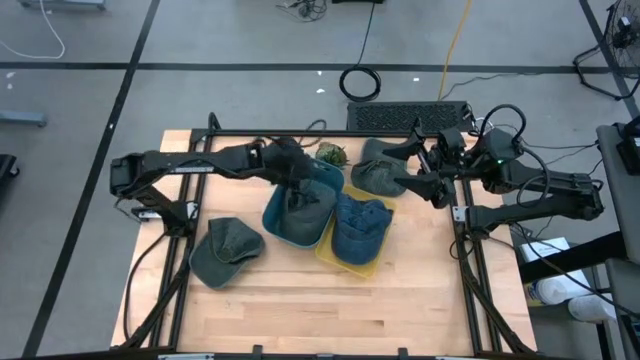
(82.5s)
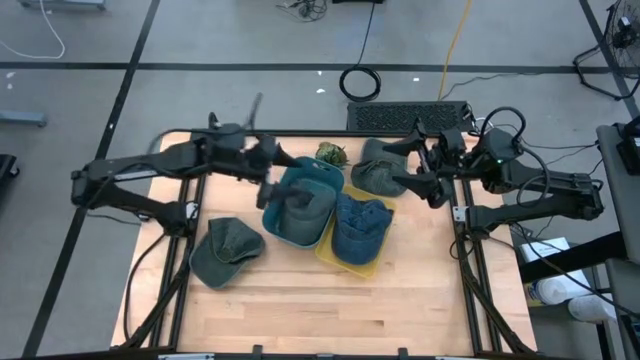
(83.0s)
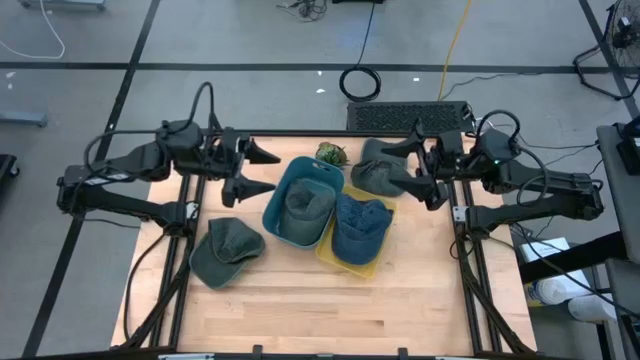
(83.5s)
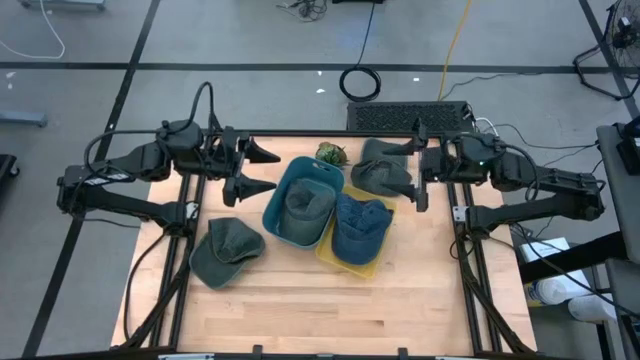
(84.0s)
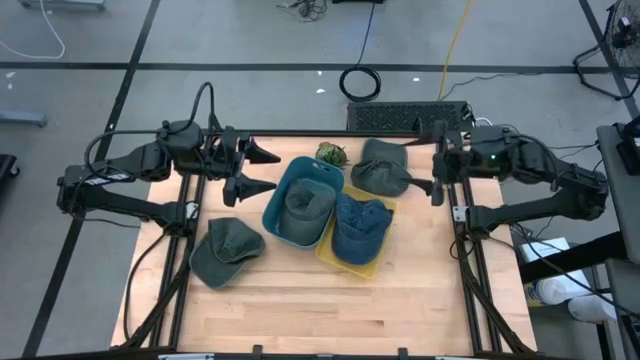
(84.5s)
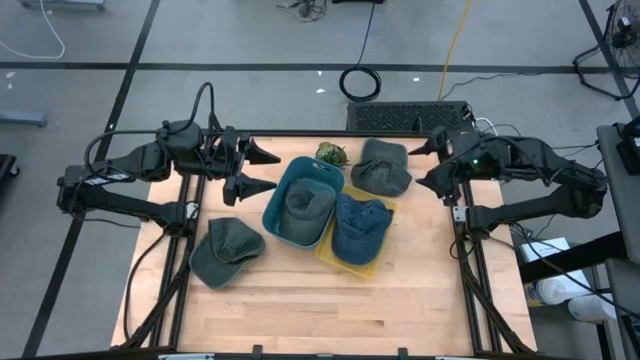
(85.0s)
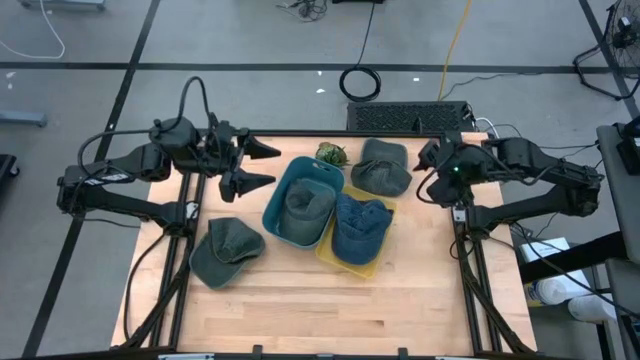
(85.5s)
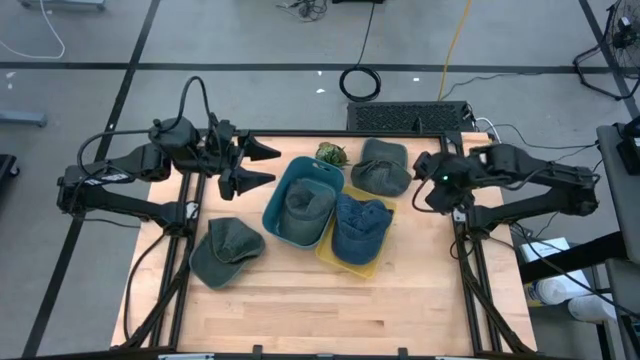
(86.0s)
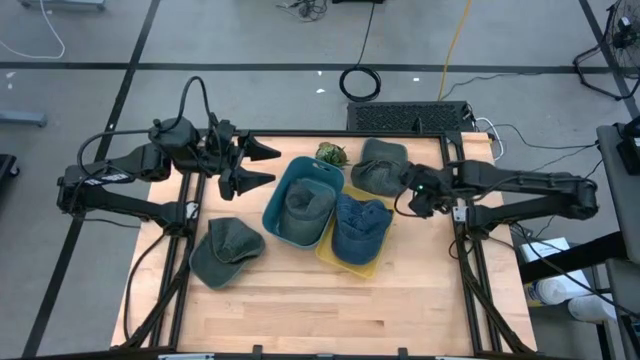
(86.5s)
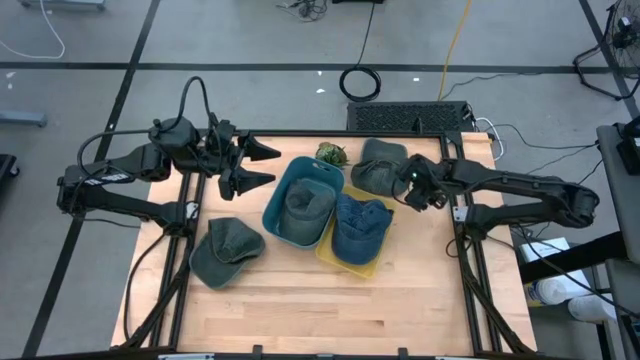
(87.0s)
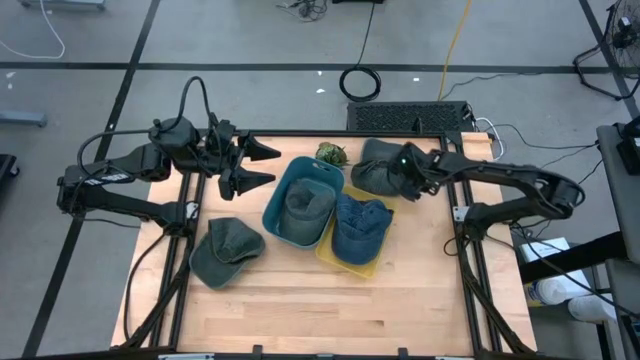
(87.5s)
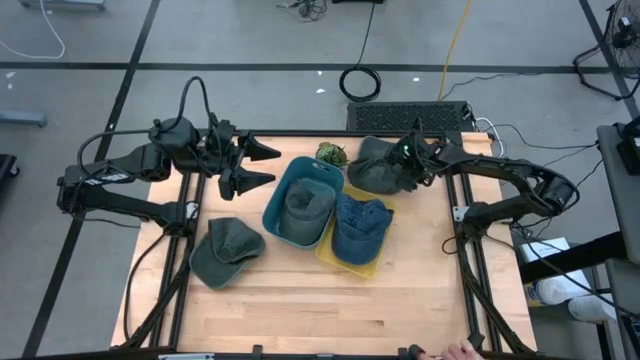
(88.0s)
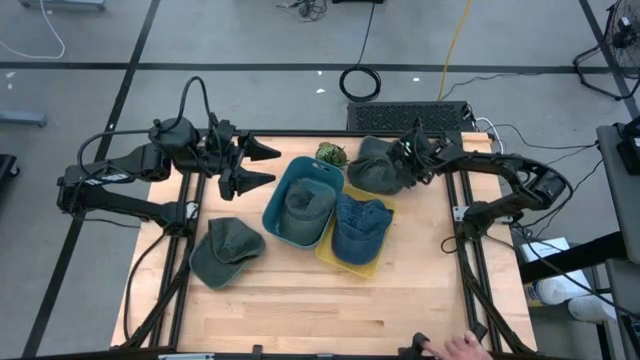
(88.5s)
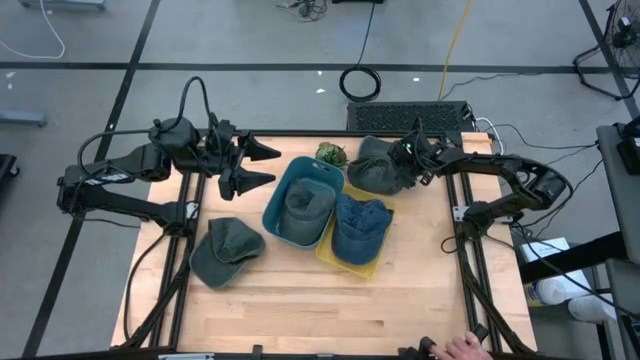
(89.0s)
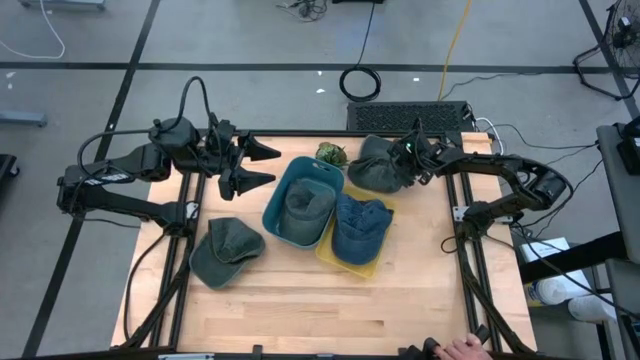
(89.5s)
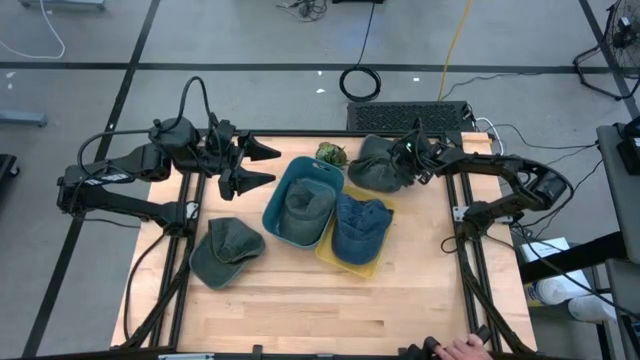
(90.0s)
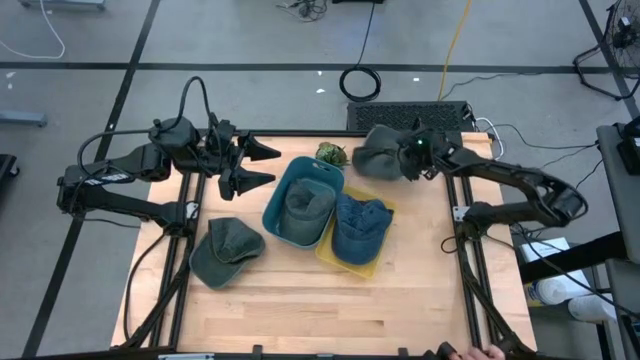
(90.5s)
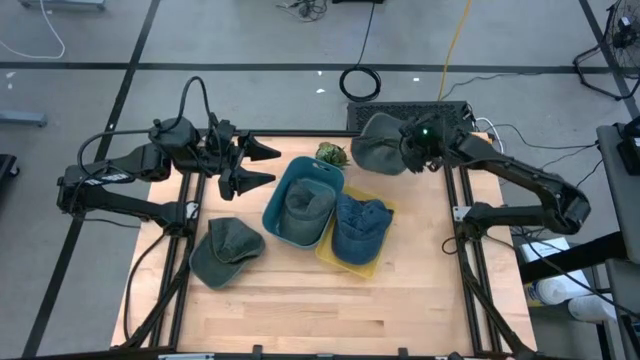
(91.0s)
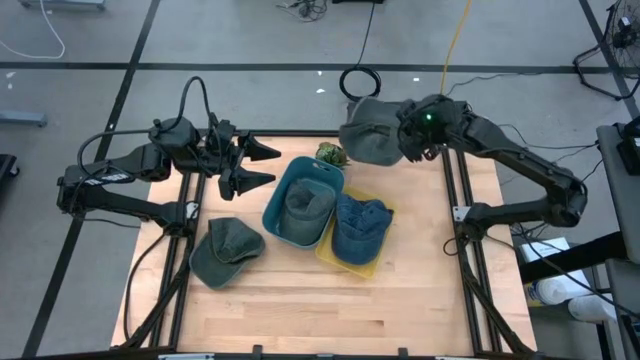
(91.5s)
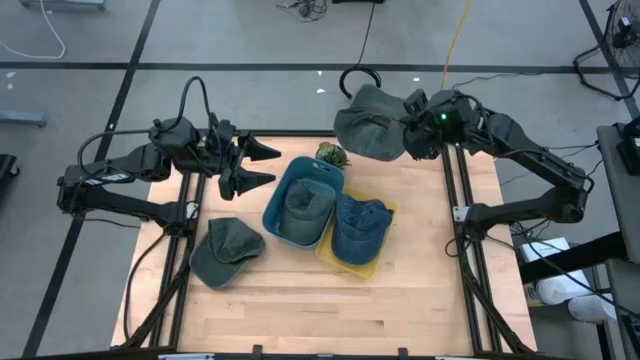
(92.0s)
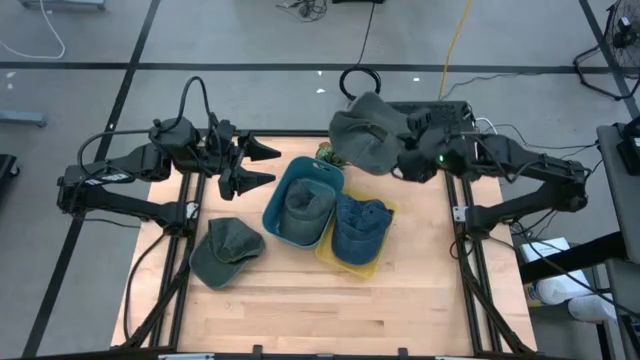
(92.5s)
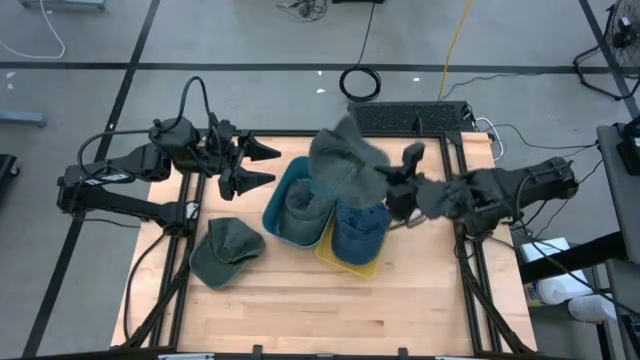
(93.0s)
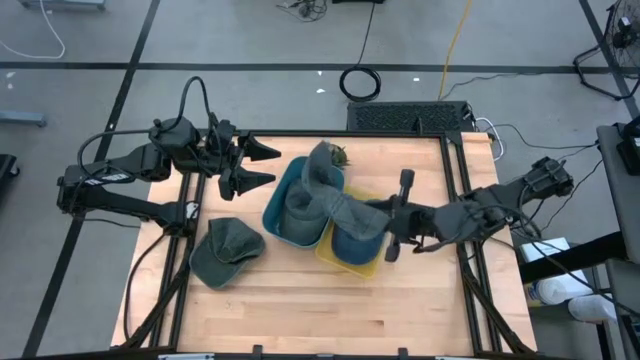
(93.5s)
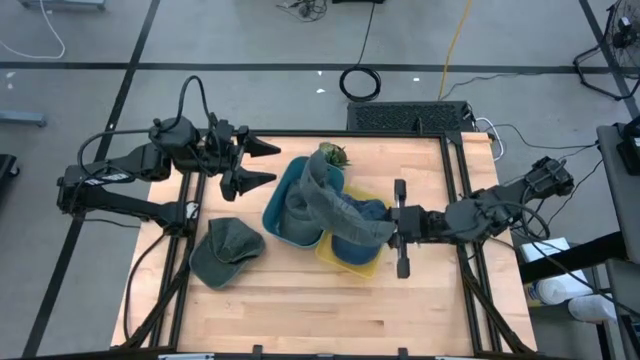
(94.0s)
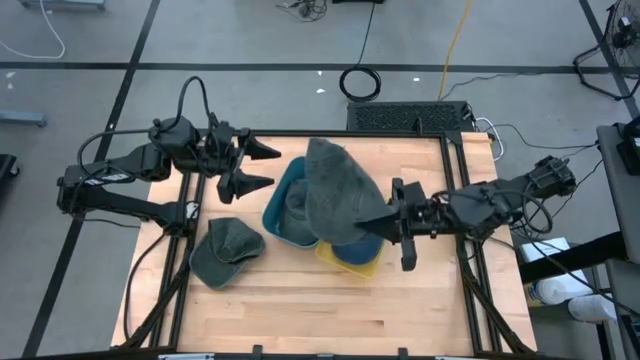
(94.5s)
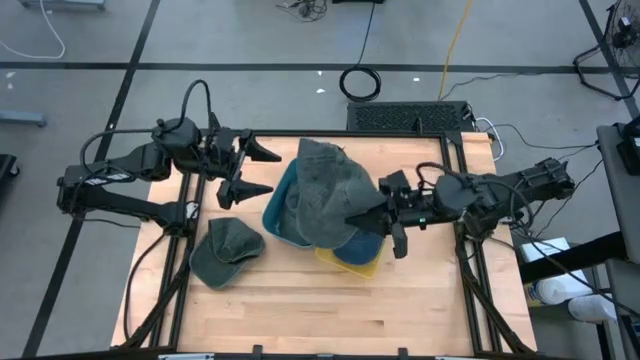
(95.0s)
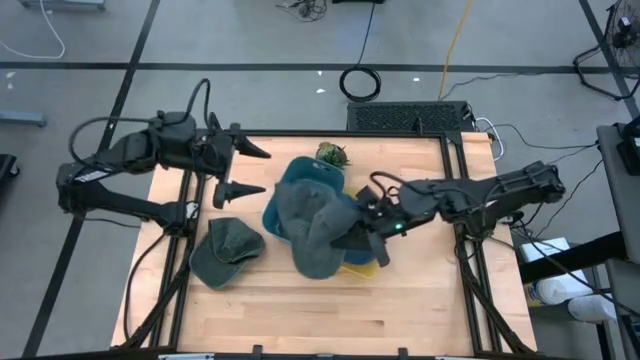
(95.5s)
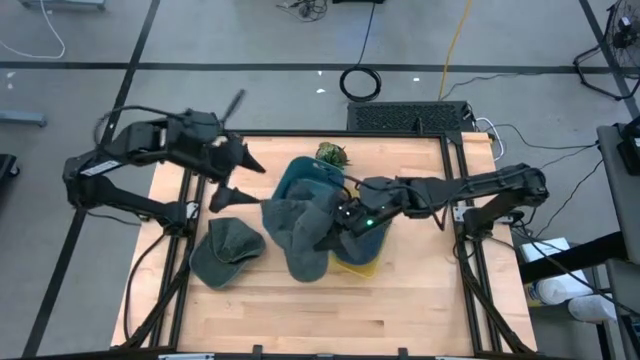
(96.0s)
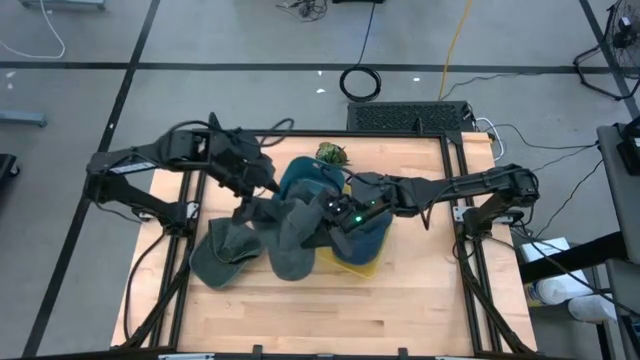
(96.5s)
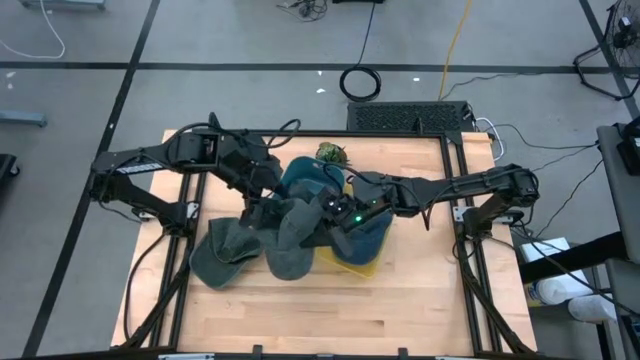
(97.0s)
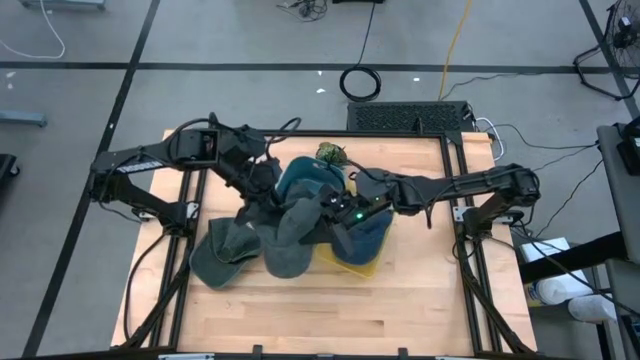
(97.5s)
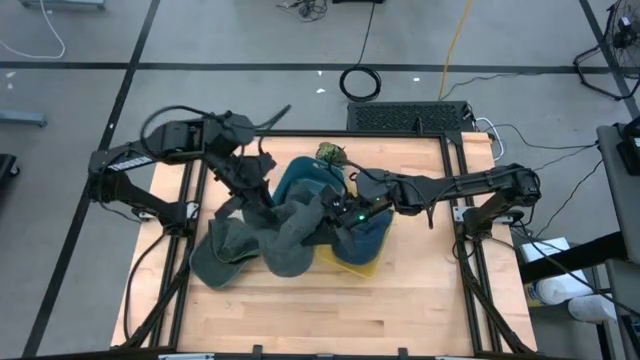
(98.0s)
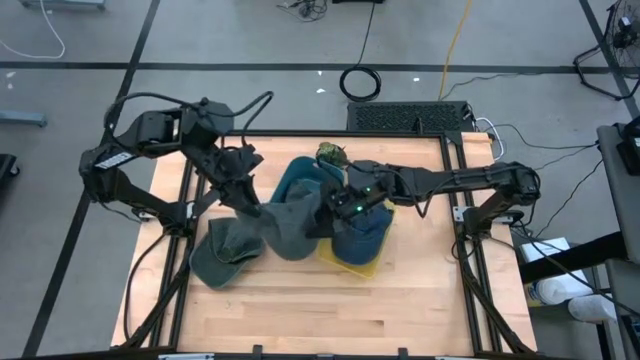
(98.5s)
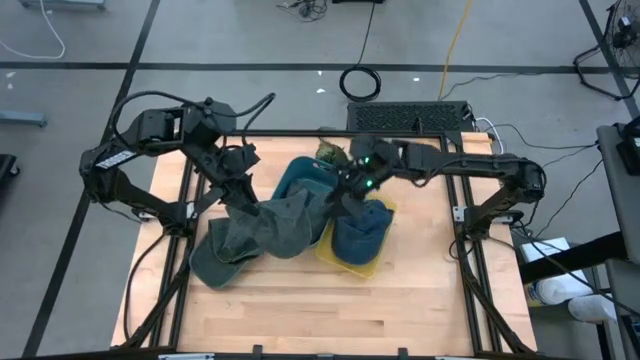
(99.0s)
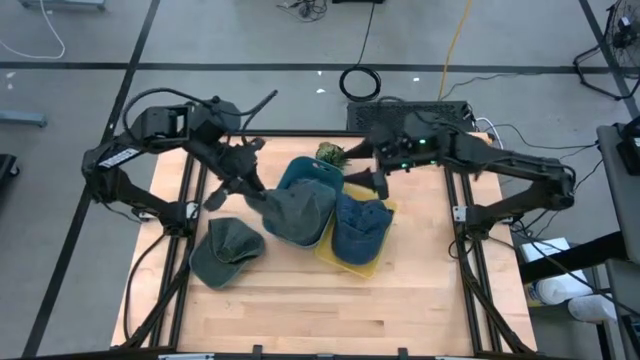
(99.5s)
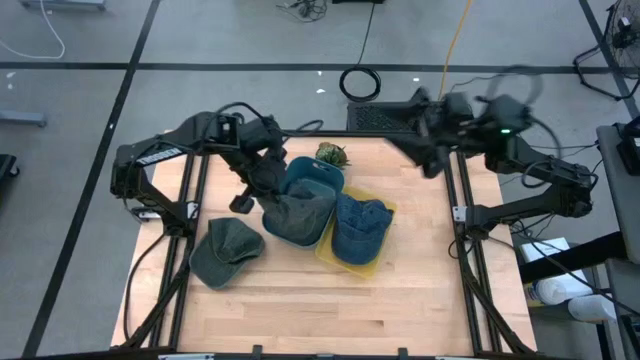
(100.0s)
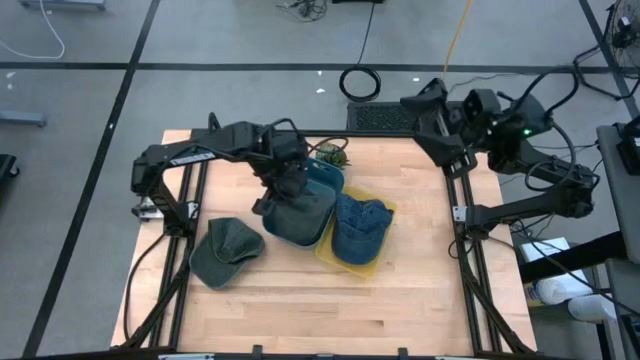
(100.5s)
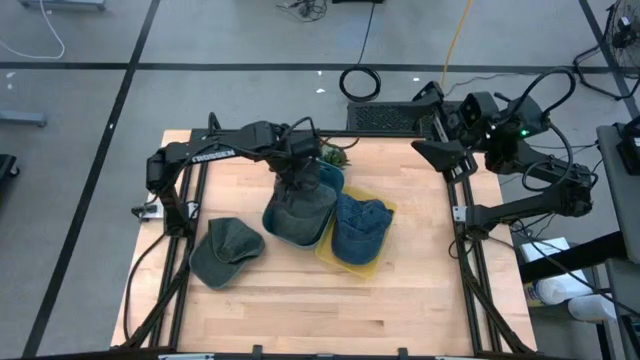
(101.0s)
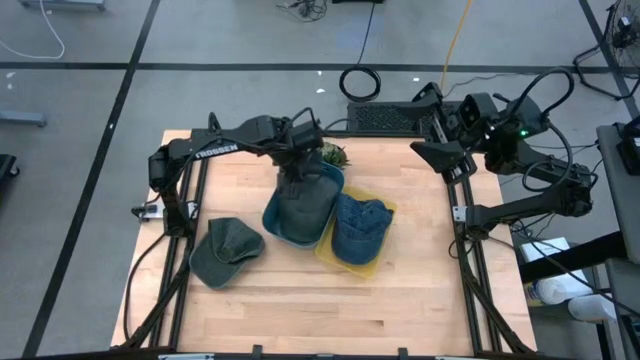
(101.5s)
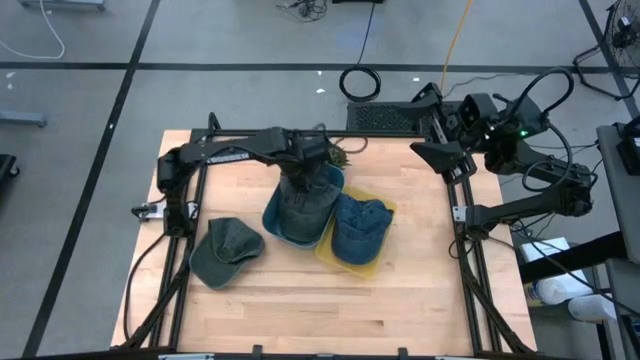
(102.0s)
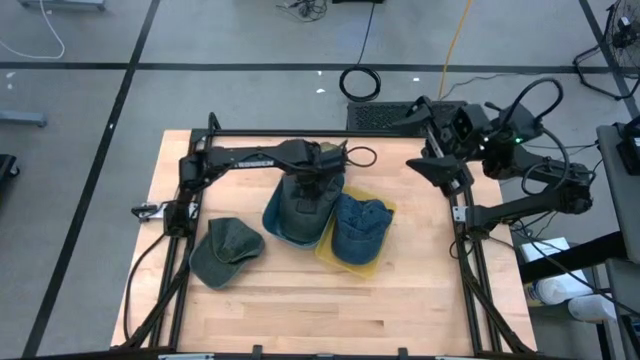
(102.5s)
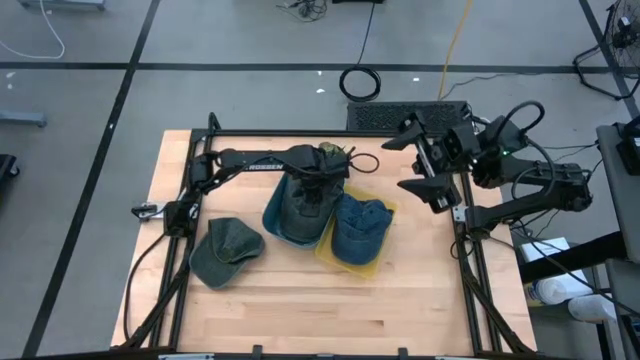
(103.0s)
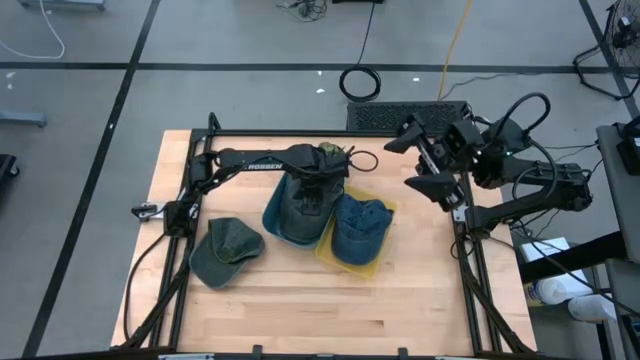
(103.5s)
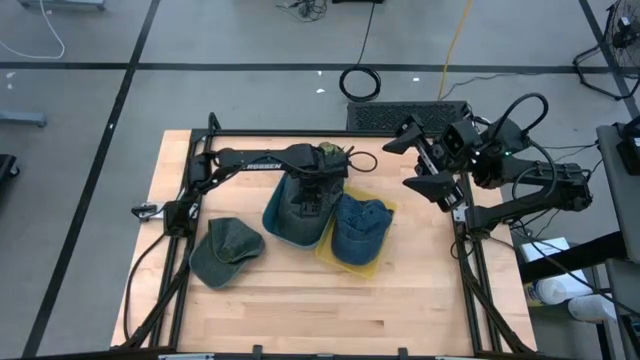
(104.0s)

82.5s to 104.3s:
Task: Pick & Place hat
Put the top black cap into the blue bin
